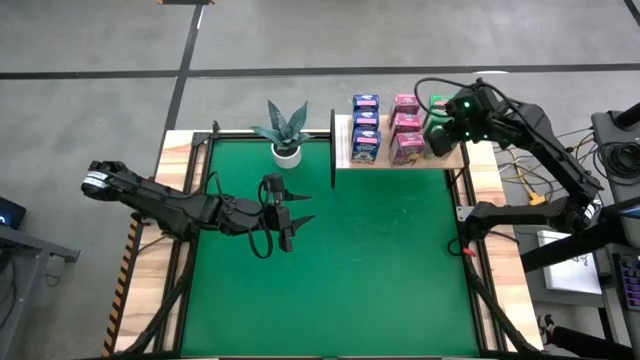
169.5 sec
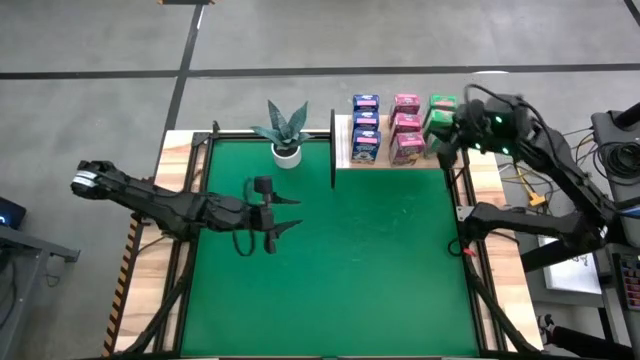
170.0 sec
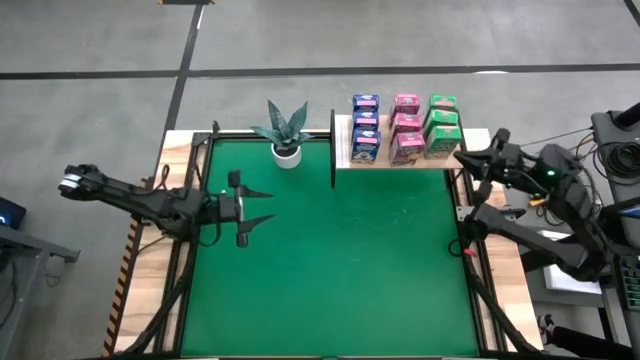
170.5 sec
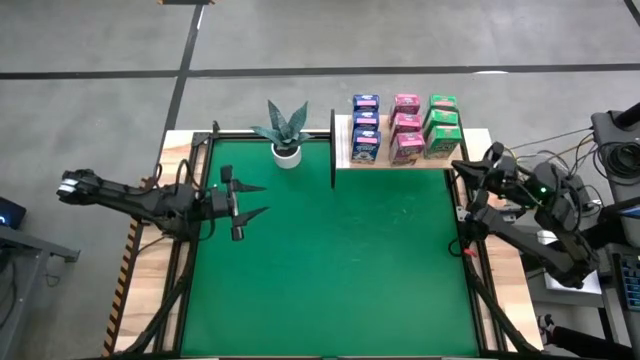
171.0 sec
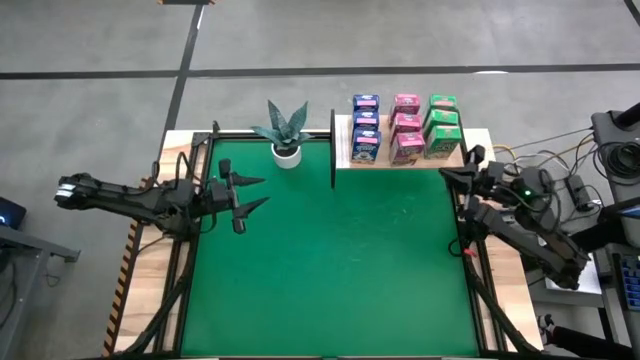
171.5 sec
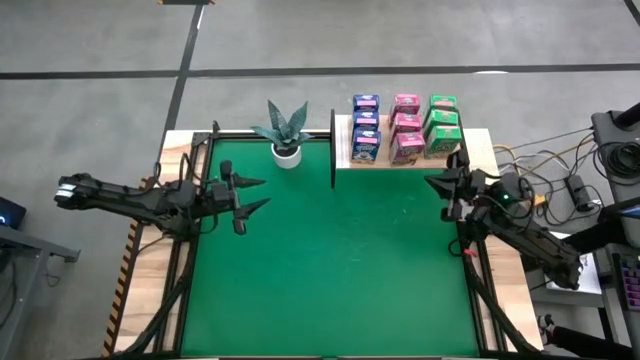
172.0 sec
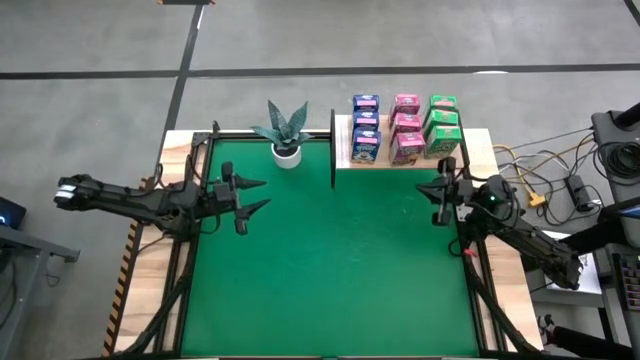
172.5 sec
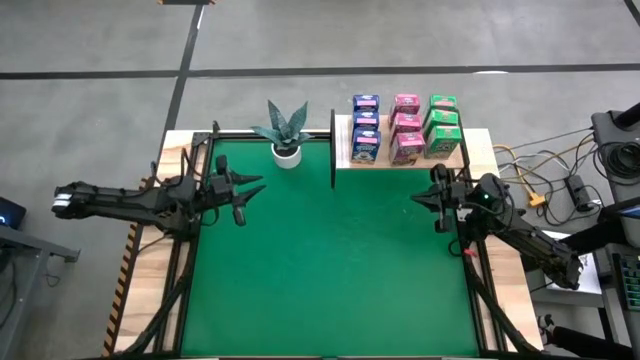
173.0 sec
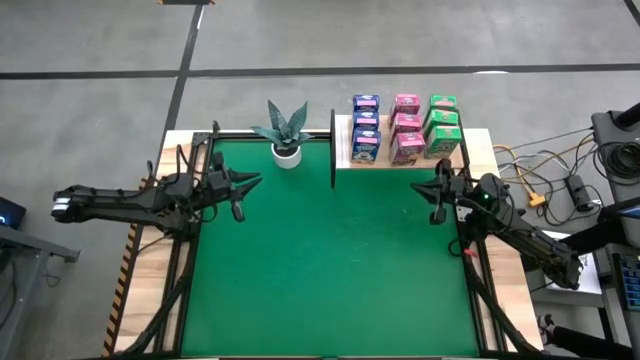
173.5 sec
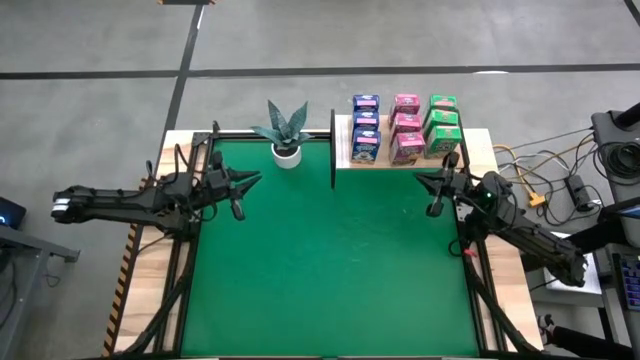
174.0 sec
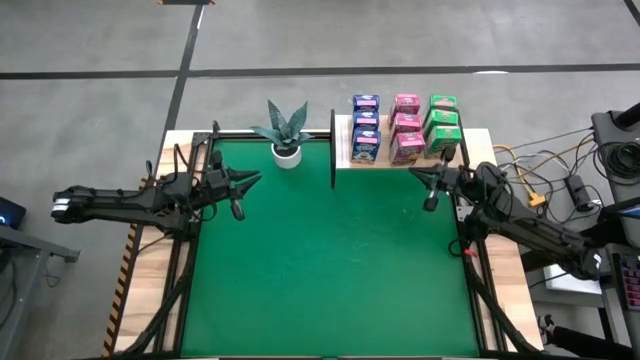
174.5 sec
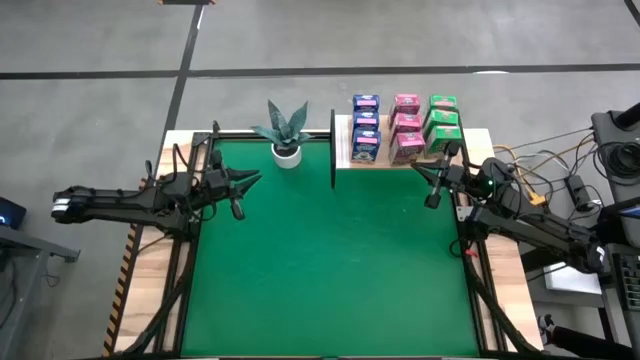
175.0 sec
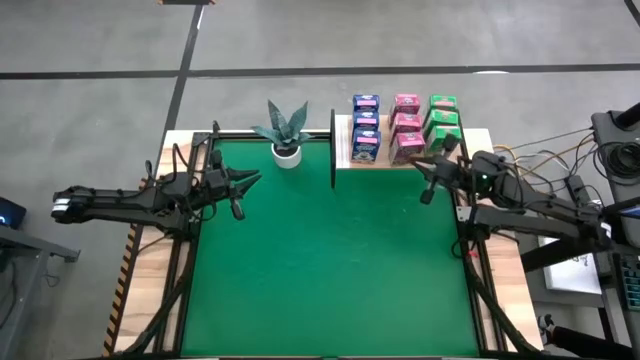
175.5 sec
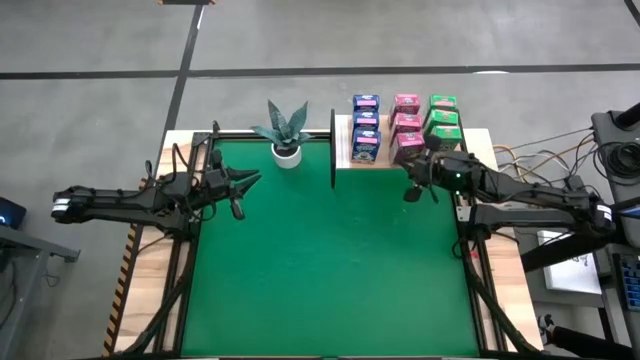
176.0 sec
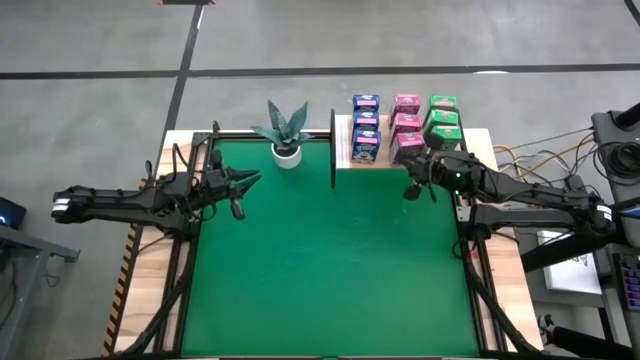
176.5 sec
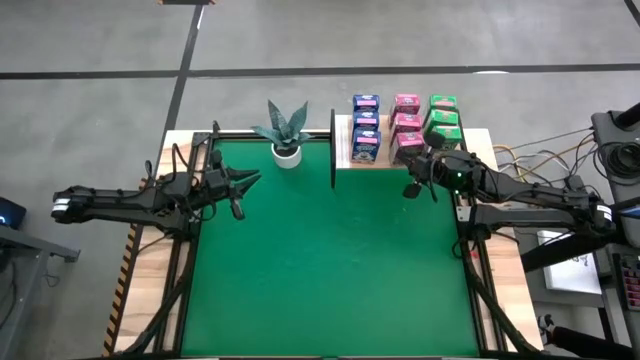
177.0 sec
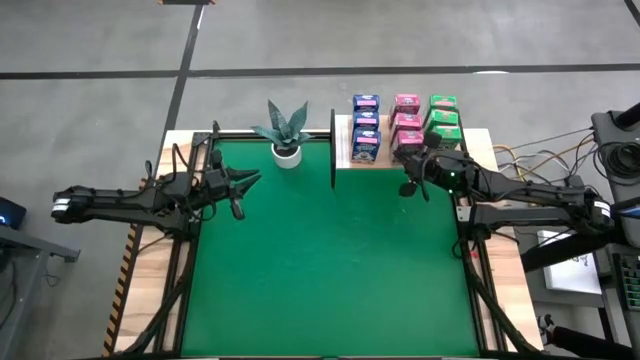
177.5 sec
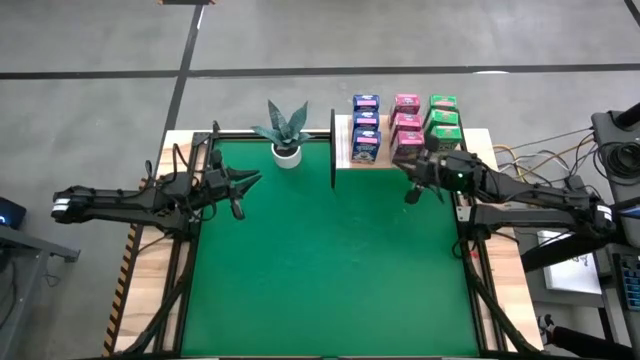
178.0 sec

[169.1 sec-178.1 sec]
Task: Stack cereal on shelf
Adjust the pink cereal box on the shelf

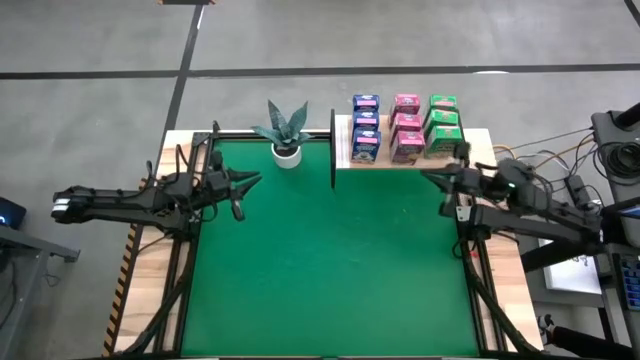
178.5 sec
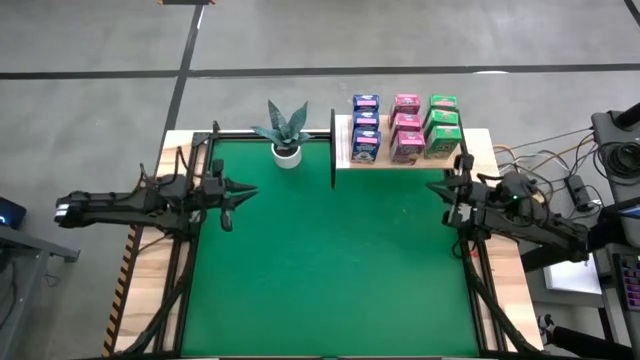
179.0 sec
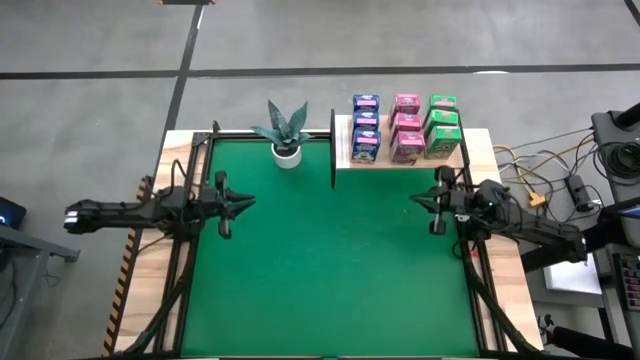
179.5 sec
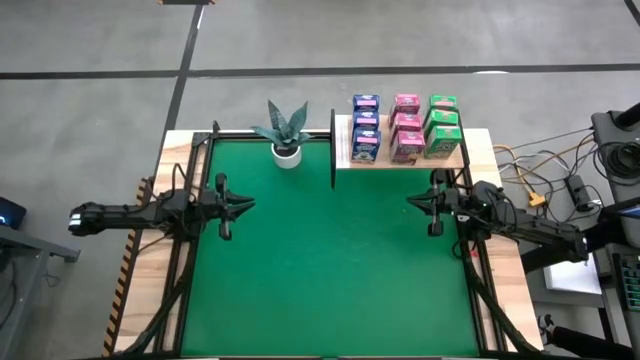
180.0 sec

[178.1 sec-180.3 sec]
Return to Home Position

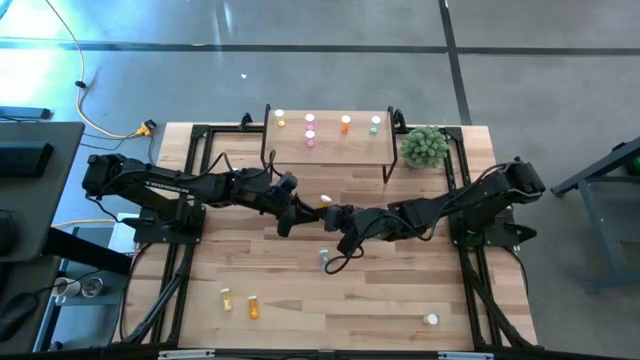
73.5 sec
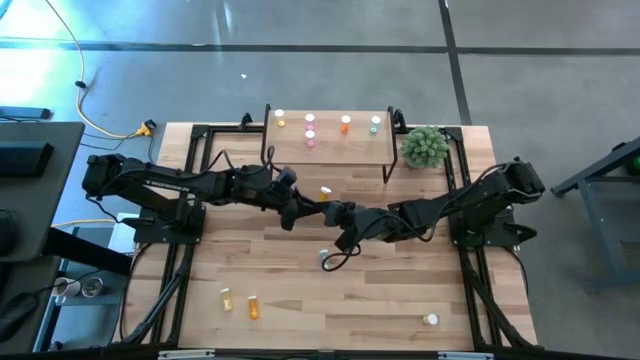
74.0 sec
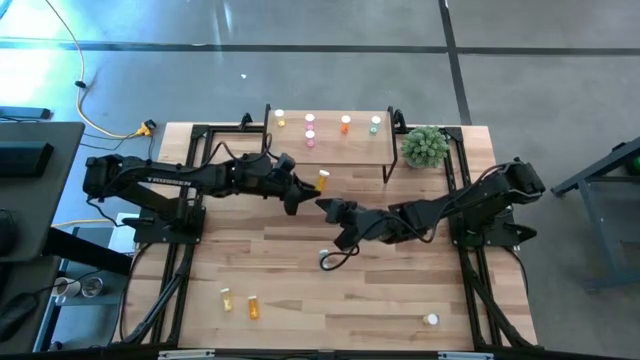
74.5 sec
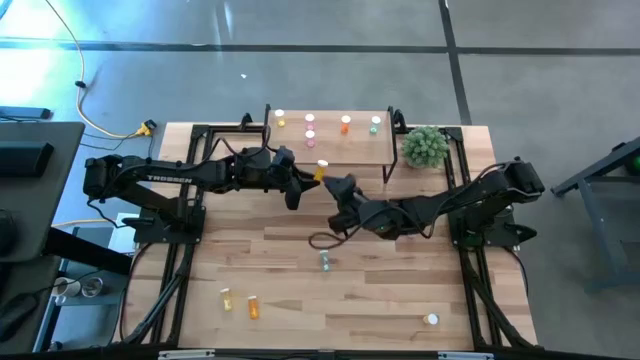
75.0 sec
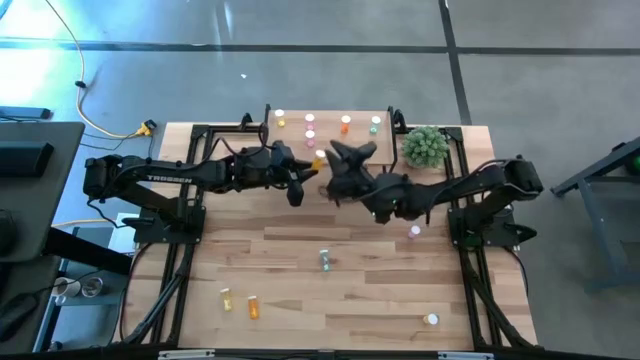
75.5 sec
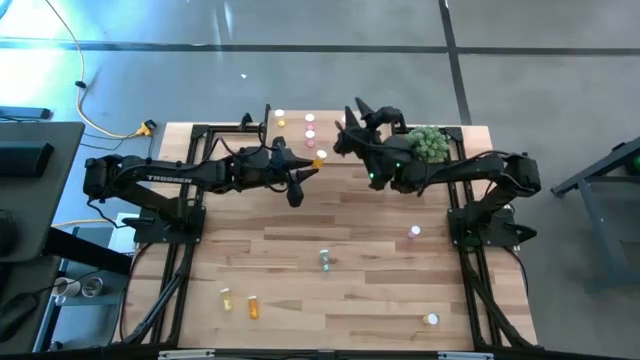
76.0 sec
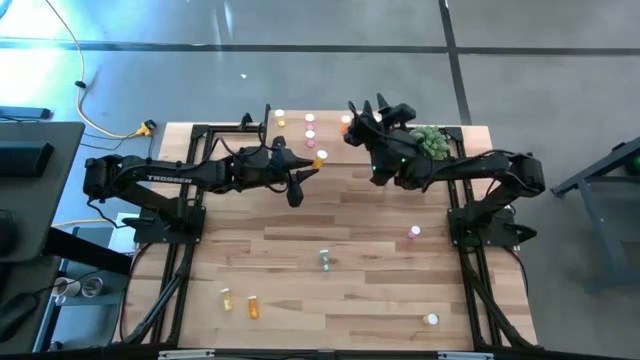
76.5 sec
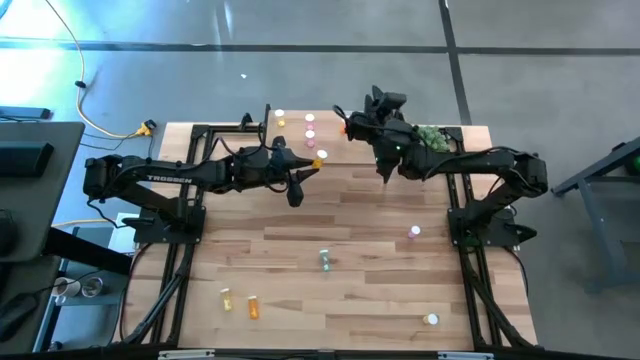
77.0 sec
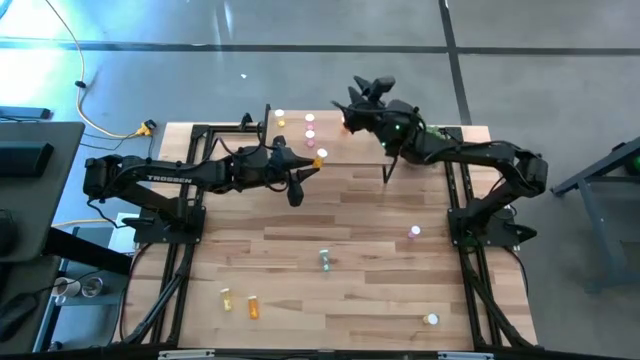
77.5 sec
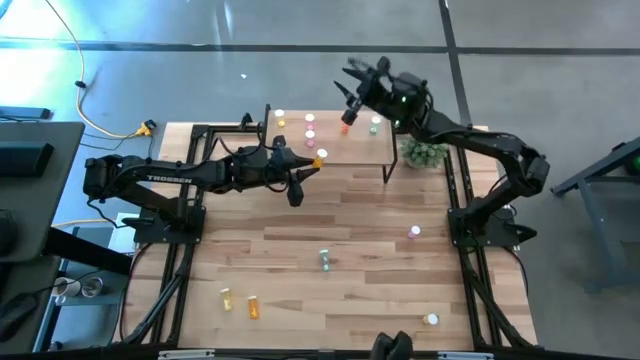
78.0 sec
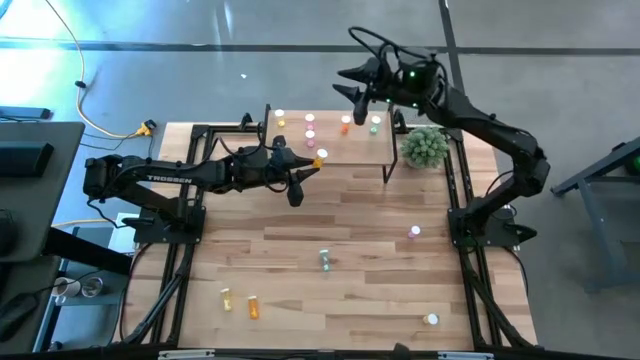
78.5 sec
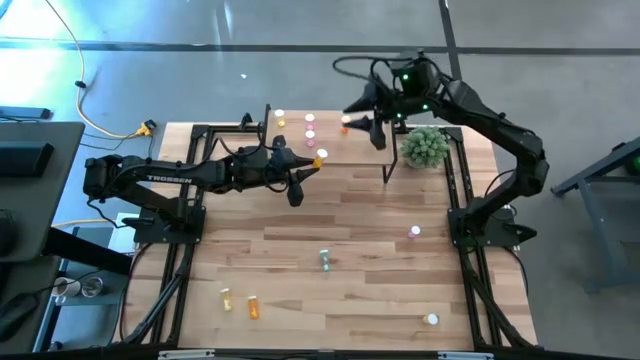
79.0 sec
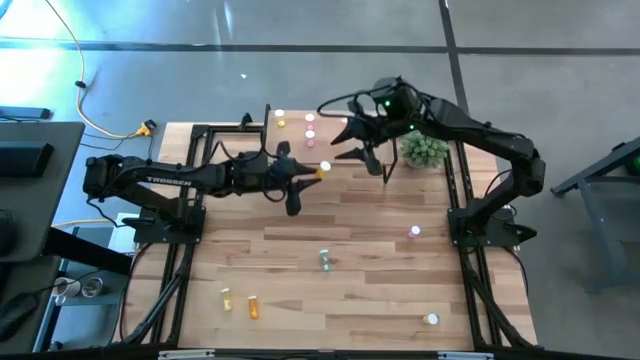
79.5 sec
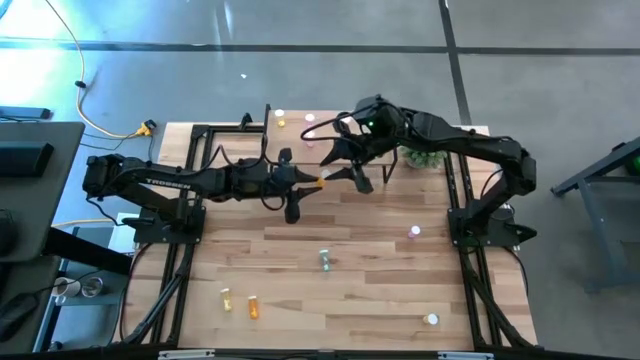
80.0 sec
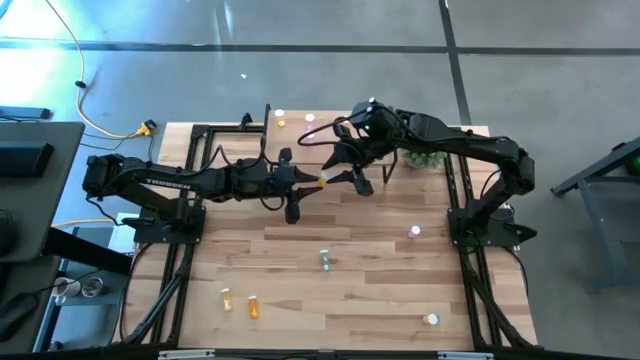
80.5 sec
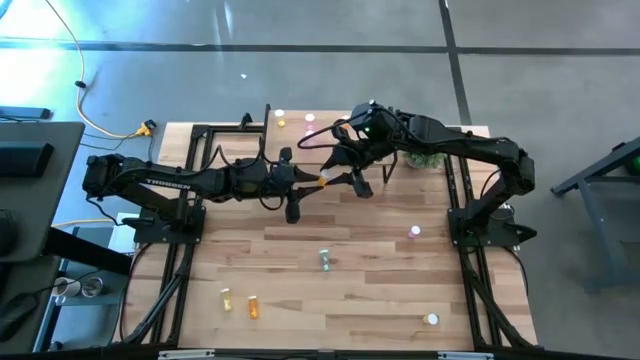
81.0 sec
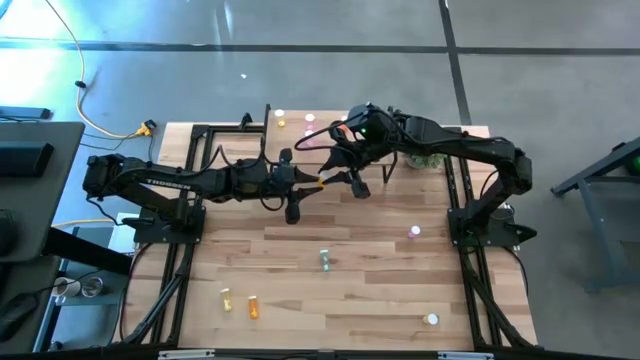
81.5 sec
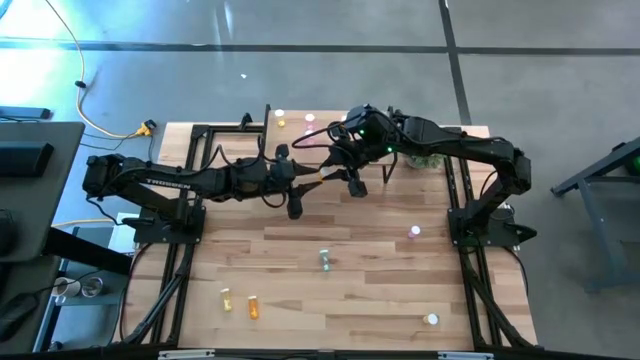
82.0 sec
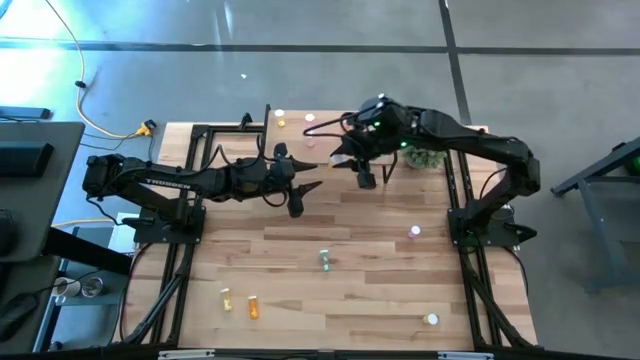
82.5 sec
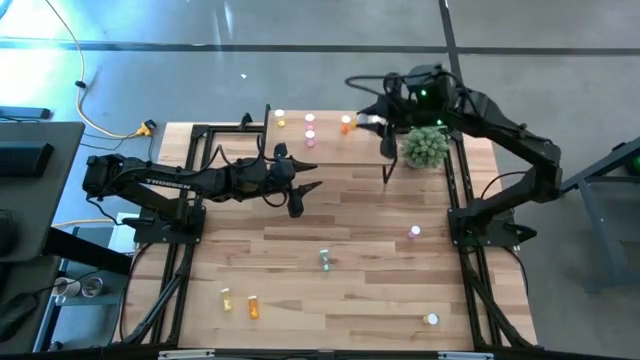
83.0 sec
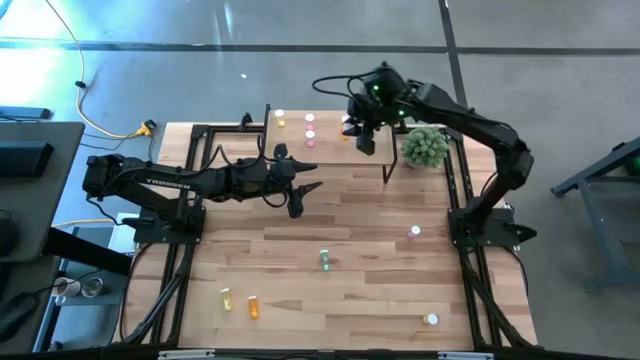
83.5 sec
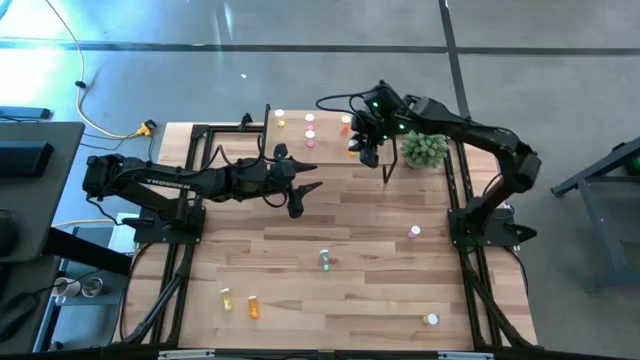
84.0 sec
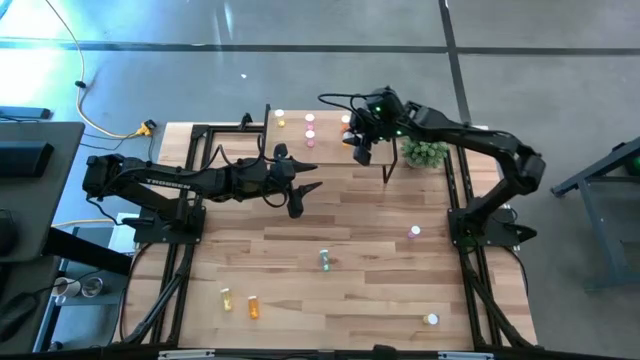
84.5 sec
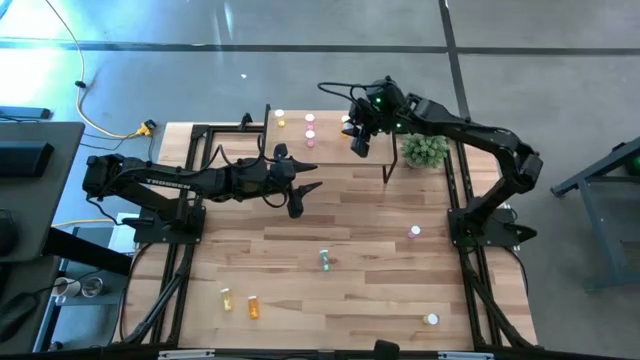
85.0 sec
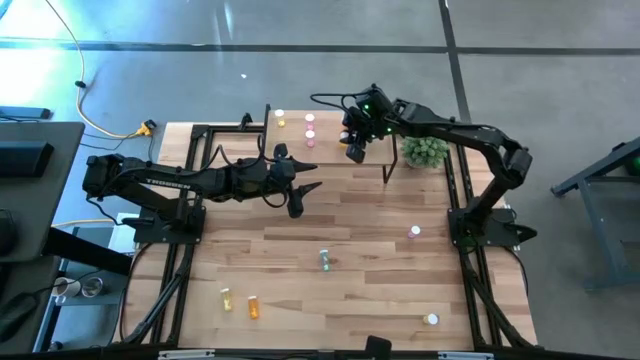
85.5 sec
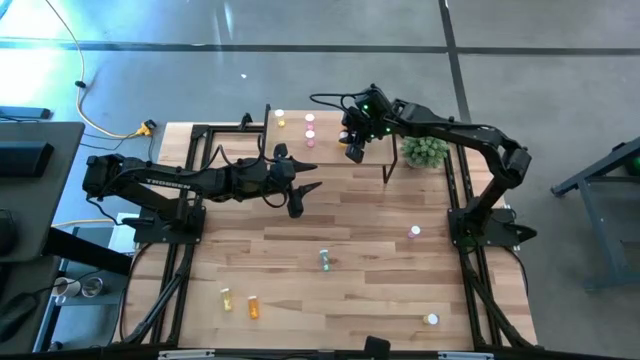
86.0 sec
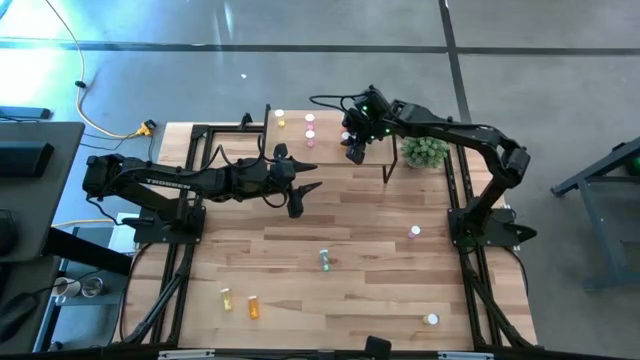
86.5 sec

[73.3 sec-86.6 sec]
Task: Pick and place medicine bottles onto shelf by color
Put the right orange pill bottle on the shelf aligned with the other orange pill bottle
